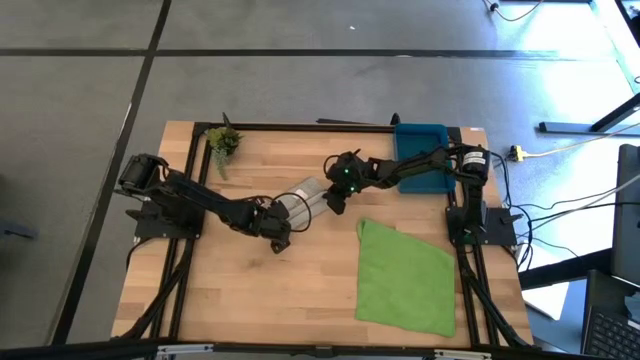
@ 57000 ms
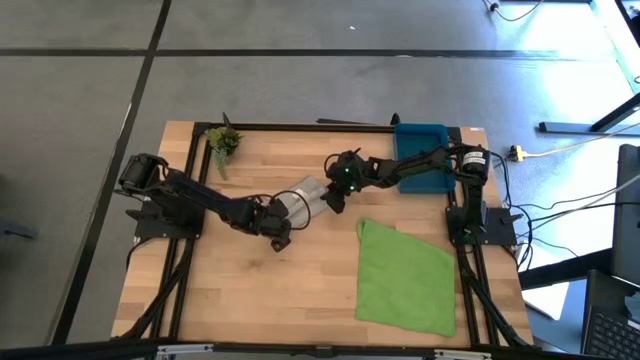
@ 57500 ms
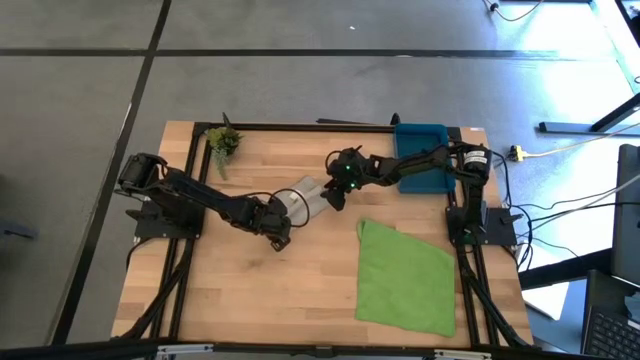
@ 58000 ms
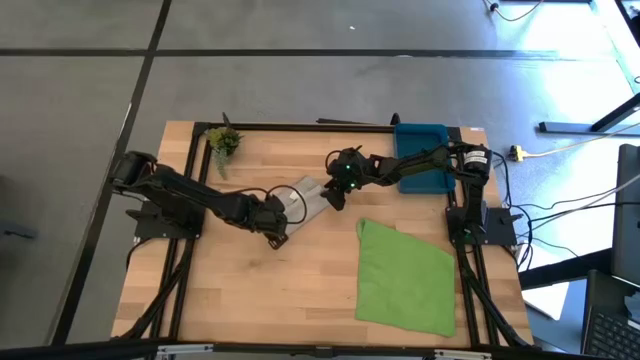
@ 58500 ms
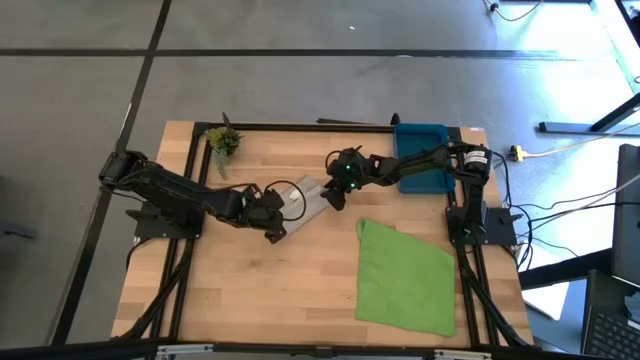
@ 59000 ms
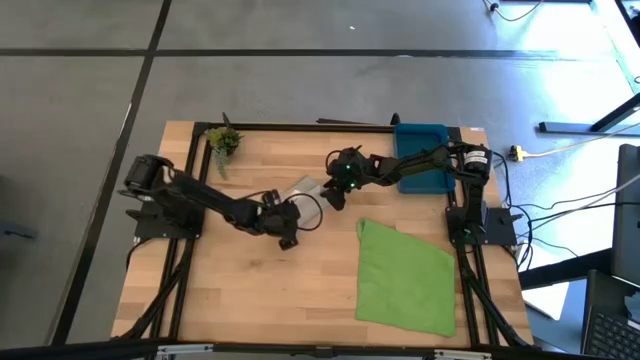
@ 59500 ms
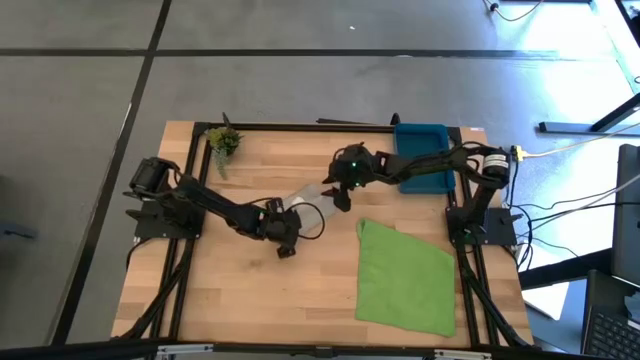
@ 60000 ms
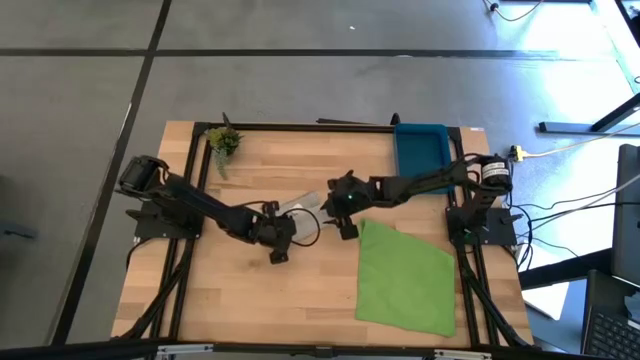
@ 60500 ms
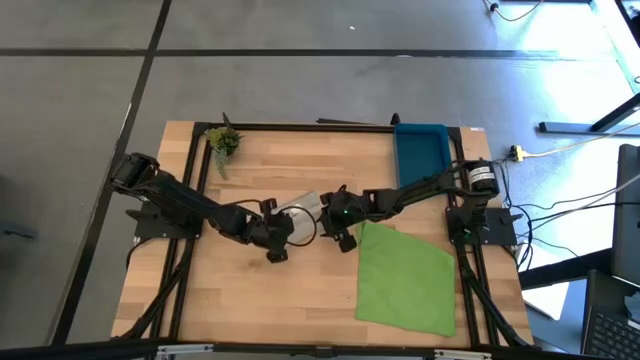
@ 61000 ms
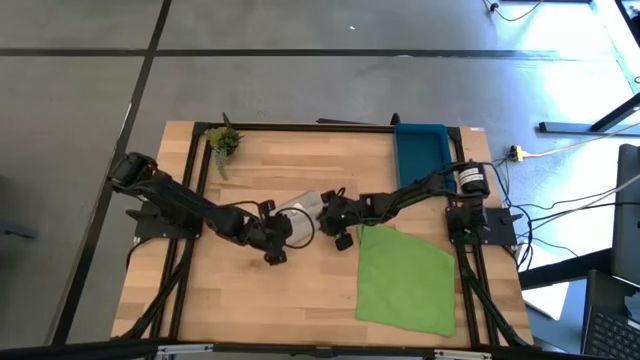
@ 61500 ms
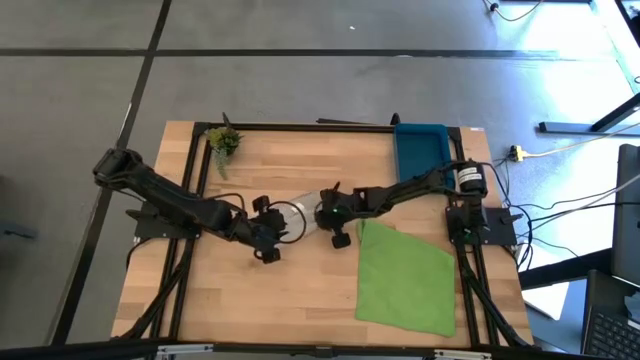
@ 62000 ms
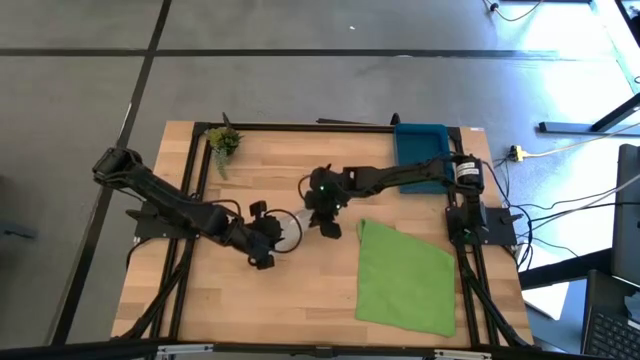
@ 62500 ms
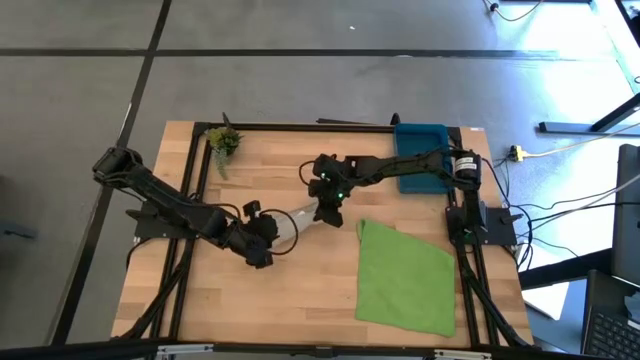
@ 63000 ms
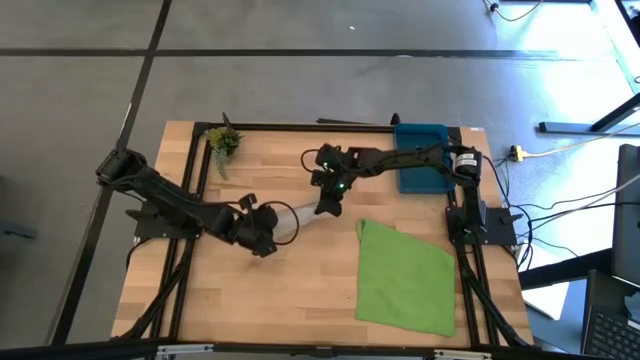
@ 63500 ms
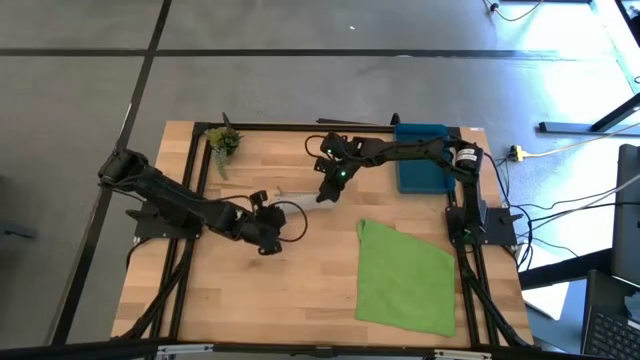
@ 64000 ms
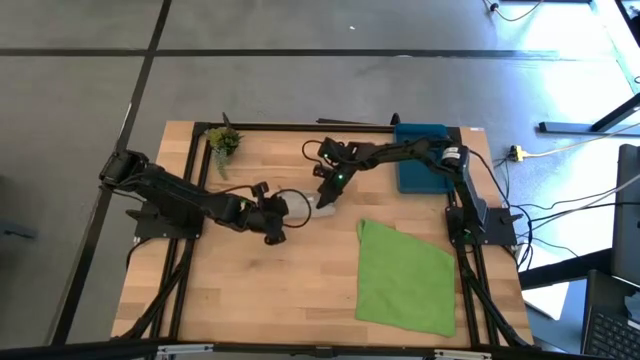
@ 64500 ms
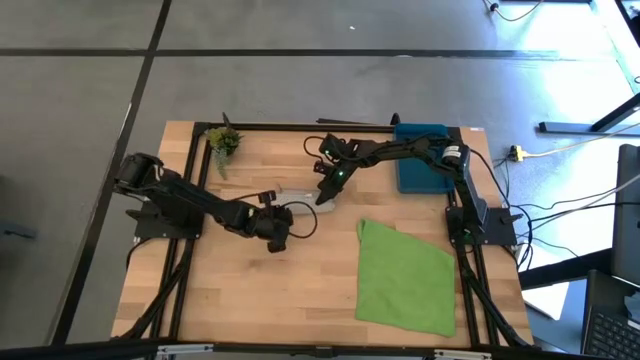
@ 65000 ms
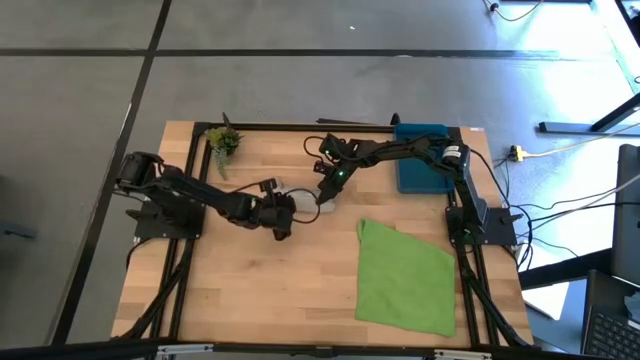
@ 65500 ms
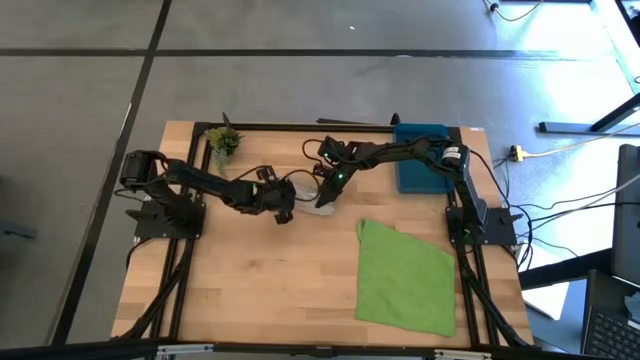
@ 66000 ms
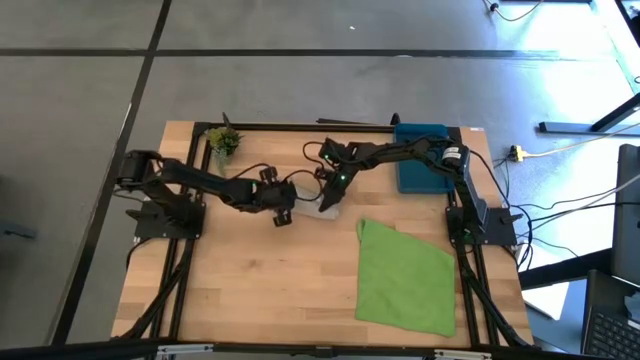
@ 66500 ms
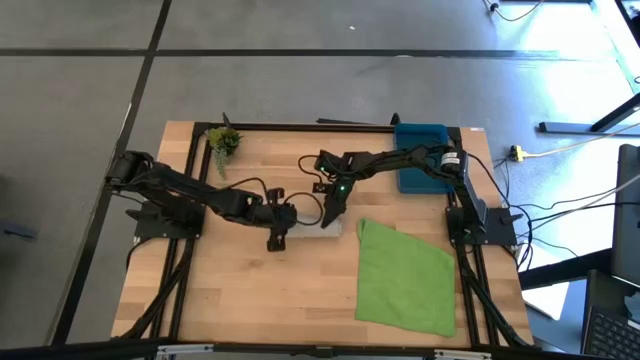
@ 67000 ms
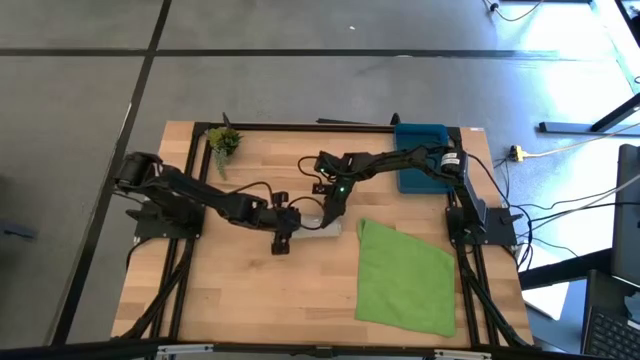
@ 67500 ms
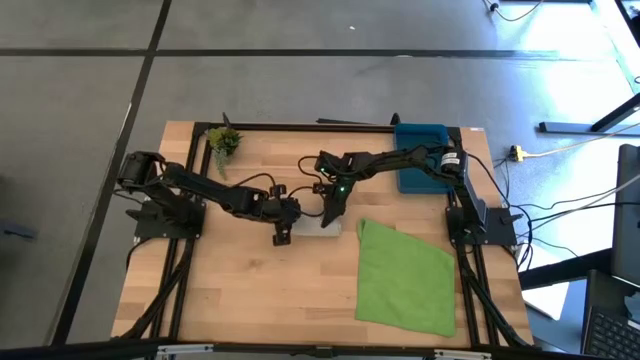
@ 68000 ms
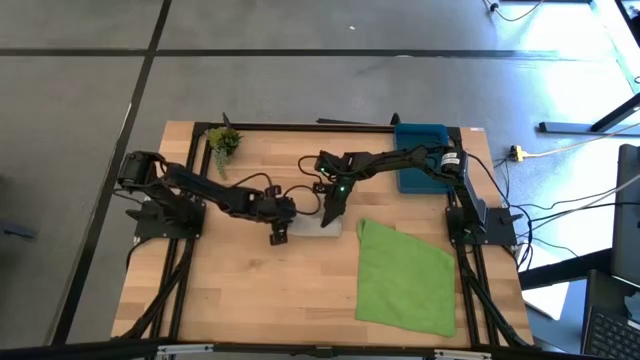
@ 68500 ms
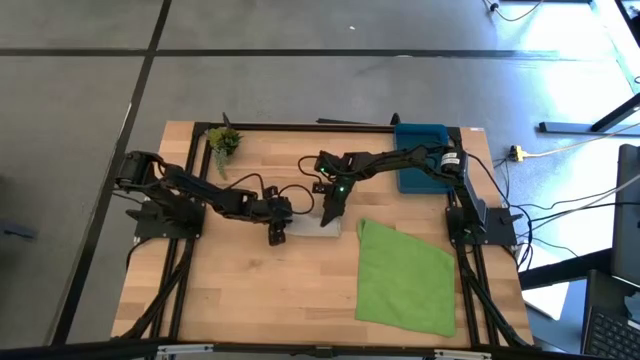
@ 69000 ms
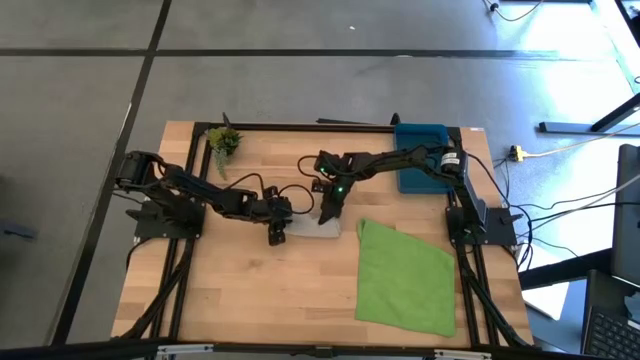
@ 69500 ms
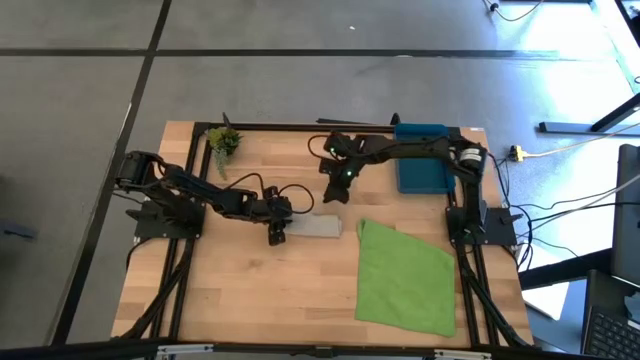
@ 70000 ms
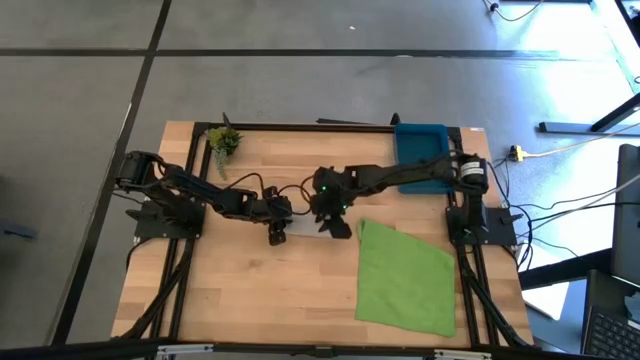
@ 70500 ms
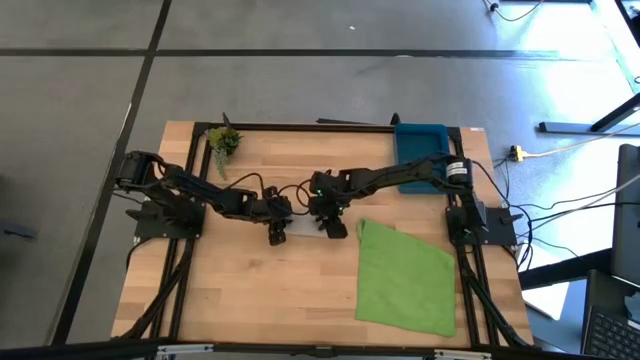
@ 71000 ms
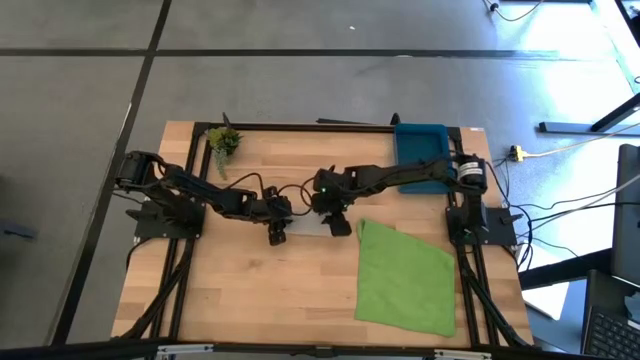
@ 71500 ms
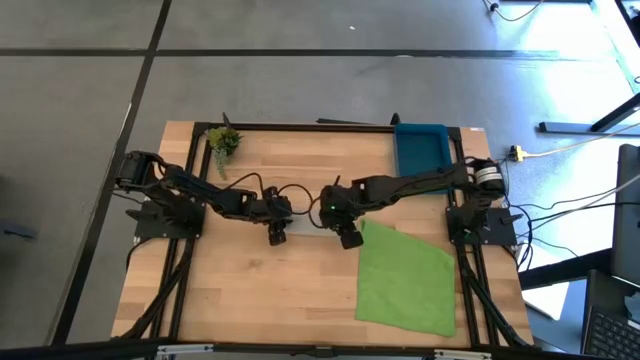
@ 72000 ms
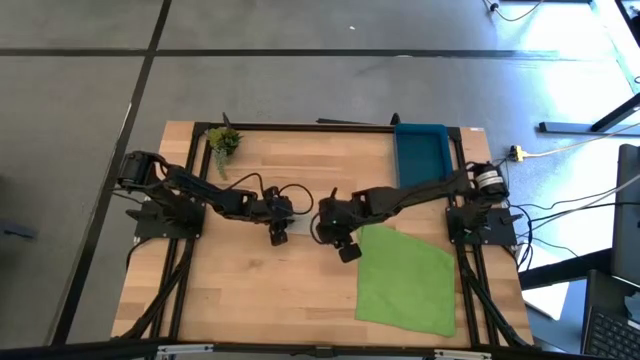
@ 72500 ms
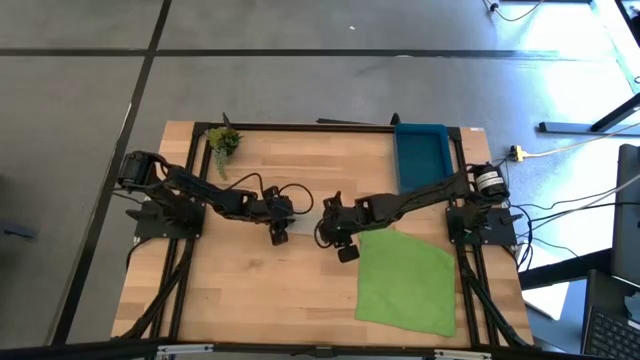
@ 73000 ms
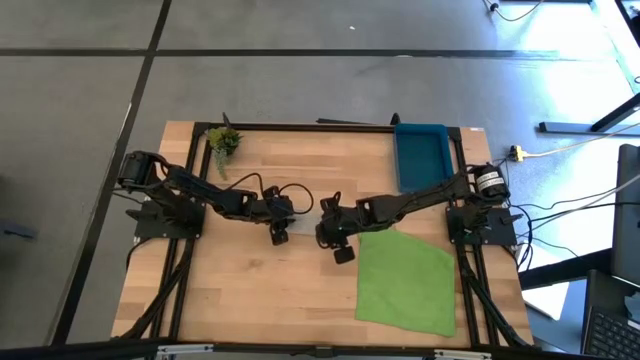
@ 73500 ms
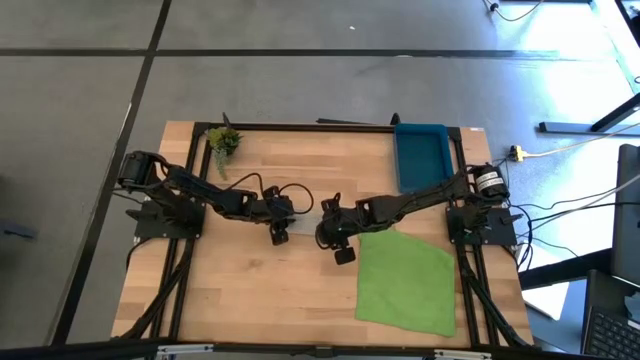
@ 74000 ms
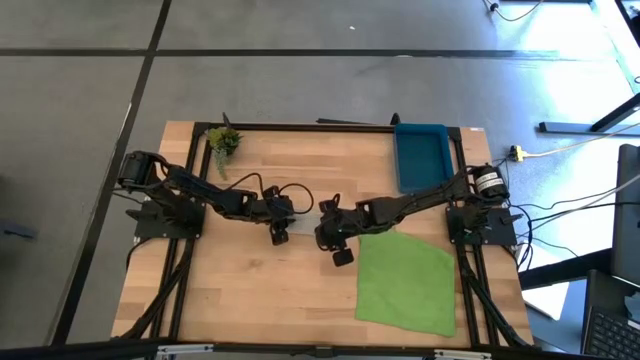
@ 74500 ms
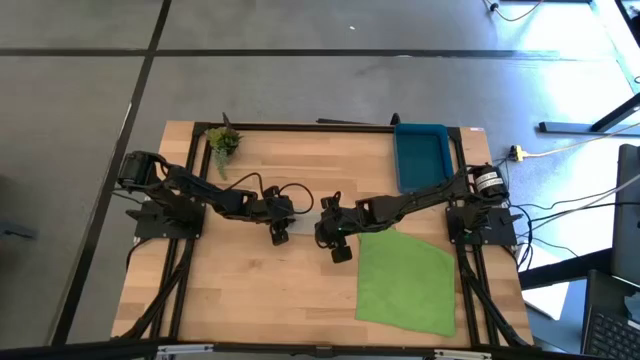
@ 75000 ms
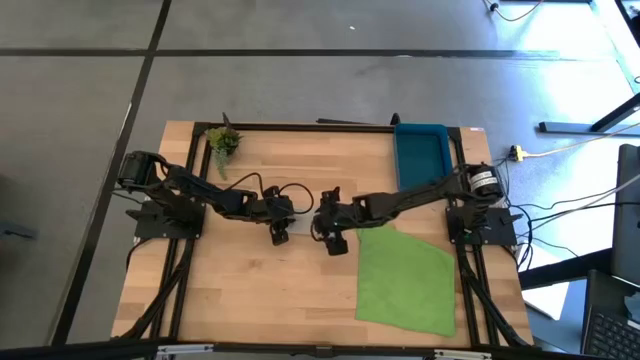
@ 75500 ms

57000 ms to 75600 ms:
Task: Roll microfiber towels into tight, uniform cylinder then place into a basket
Roll the gray towel

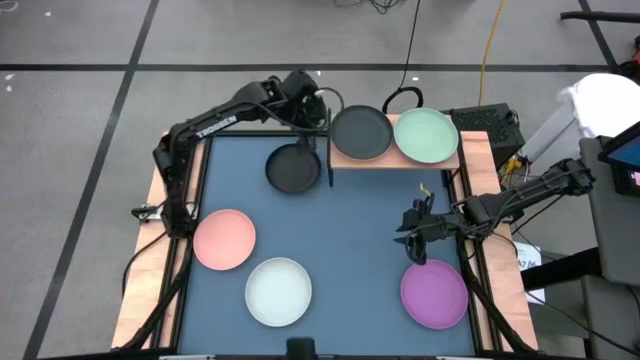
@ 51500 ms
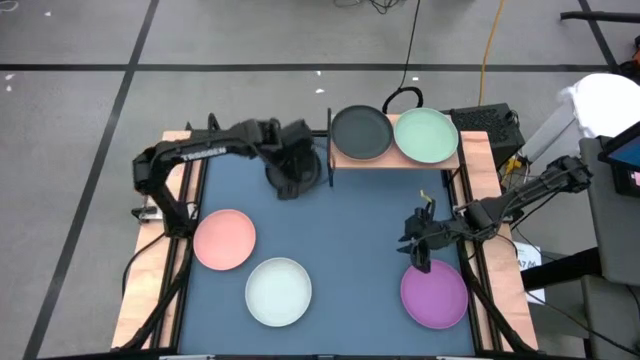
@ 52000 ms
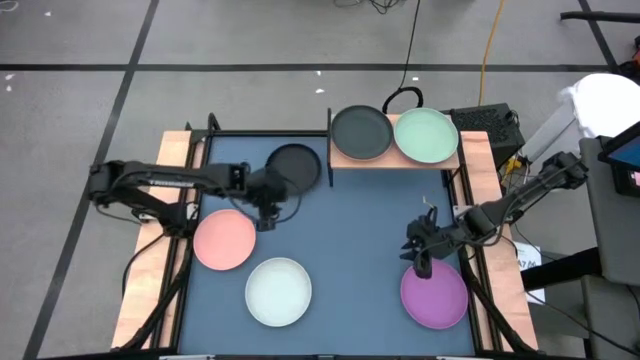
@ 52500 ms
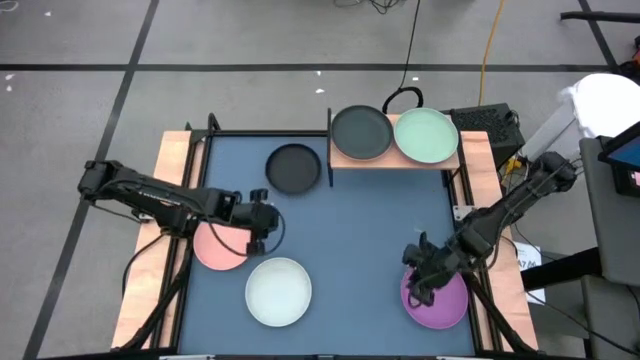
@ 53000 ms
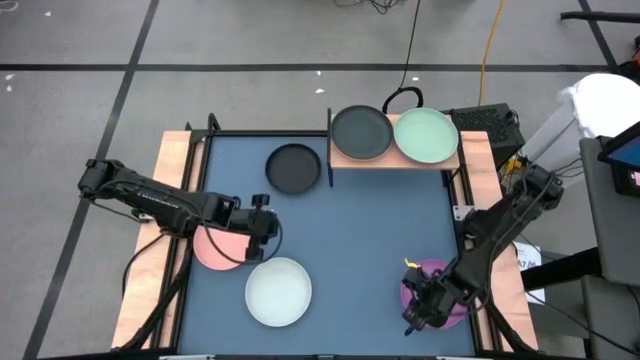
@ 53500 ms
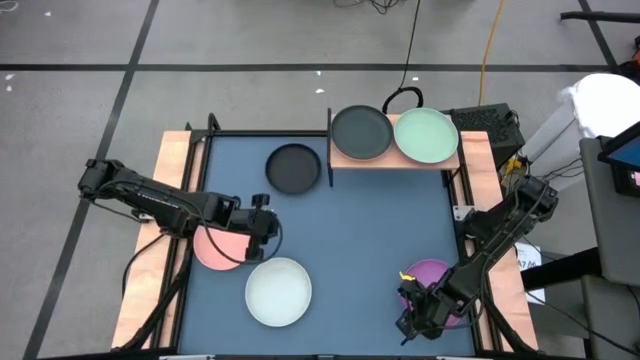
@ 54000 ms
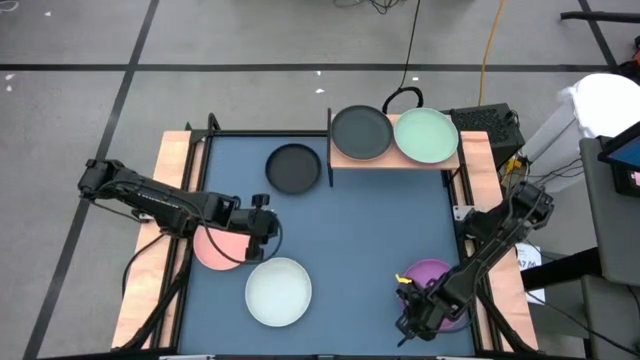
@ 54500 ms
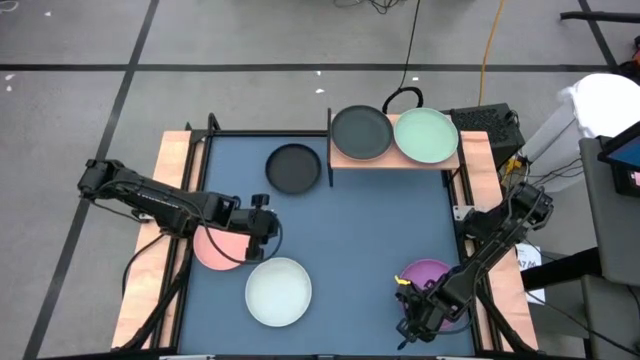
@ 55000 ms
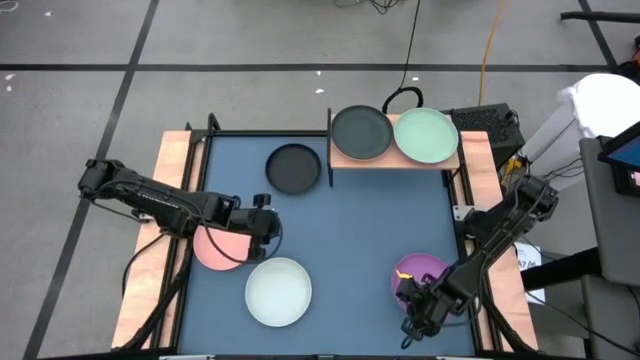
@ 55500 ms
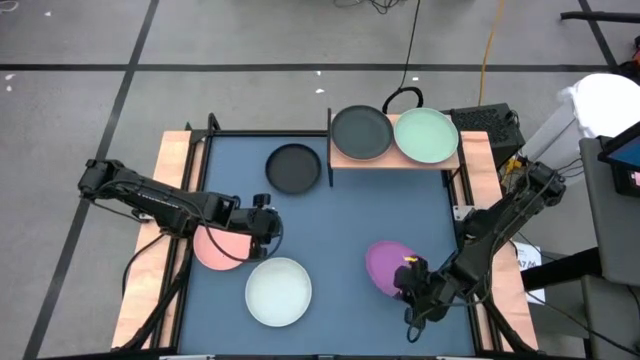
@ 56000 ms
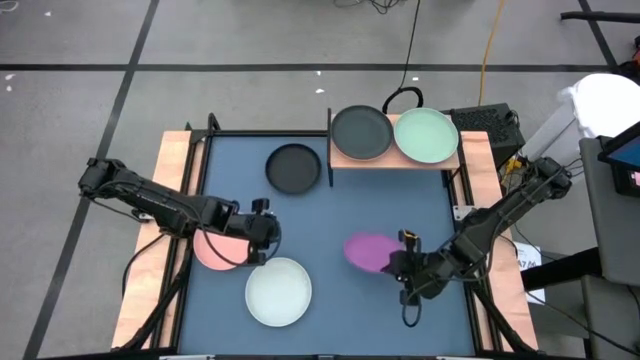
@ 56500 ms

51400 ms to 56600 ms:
Task: Place and stack plates onto a shelf
Stack the purple plate on top of the black plate on the shelf
